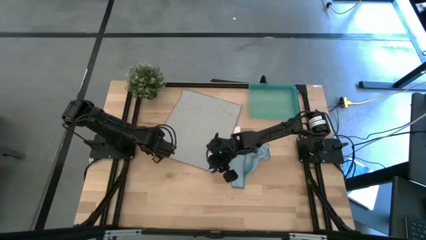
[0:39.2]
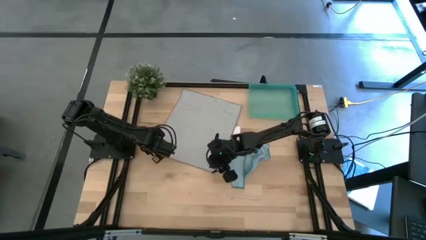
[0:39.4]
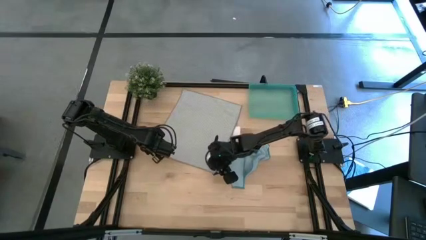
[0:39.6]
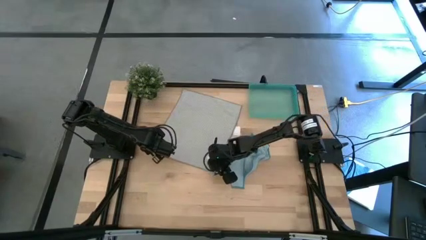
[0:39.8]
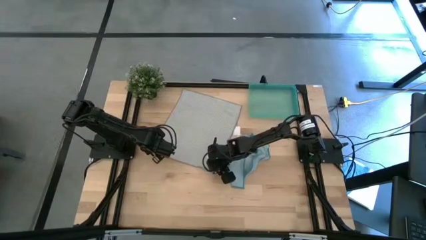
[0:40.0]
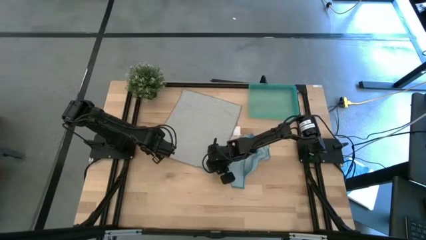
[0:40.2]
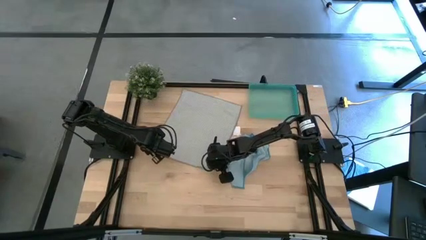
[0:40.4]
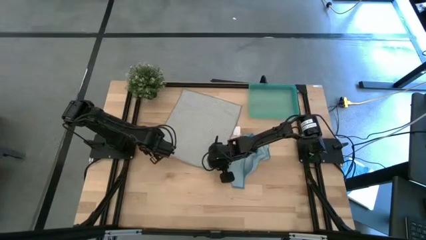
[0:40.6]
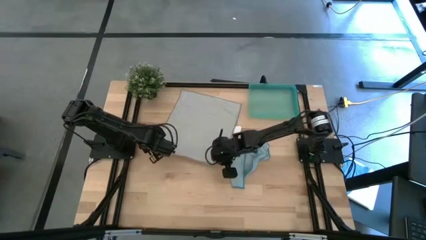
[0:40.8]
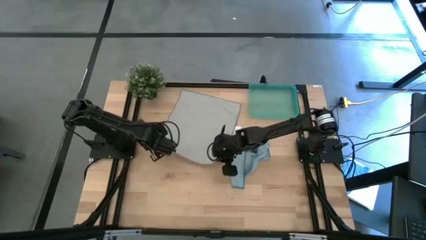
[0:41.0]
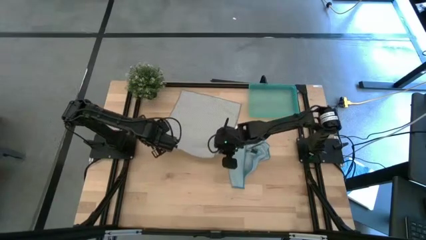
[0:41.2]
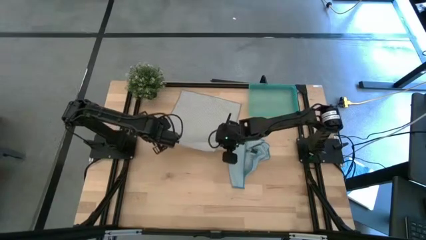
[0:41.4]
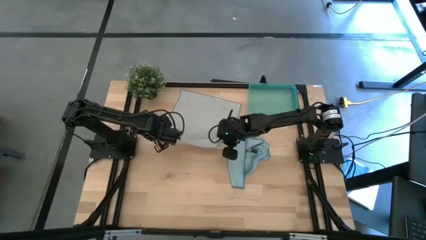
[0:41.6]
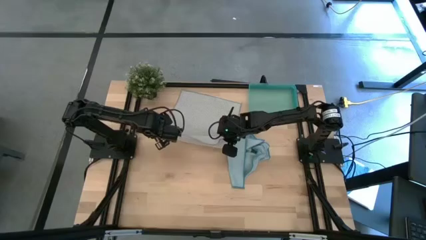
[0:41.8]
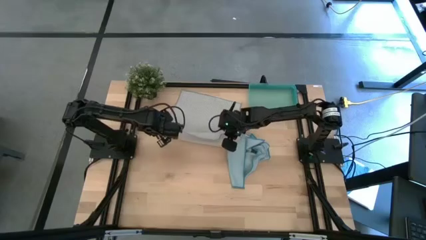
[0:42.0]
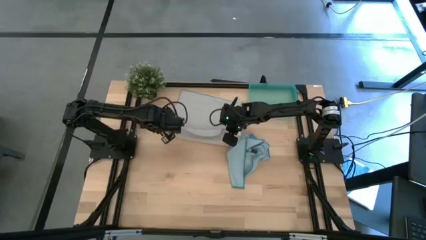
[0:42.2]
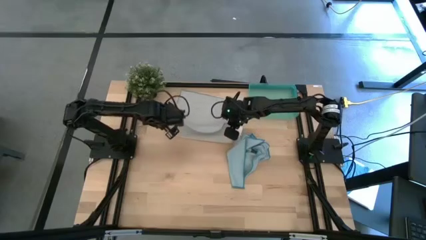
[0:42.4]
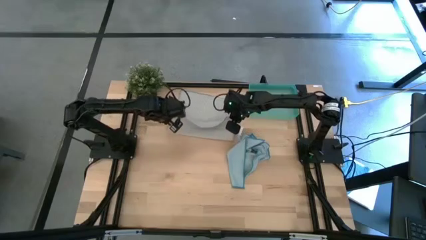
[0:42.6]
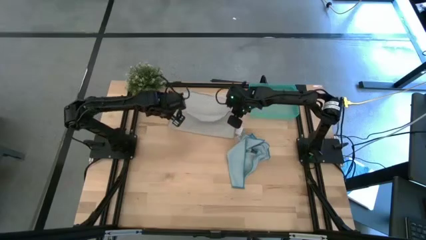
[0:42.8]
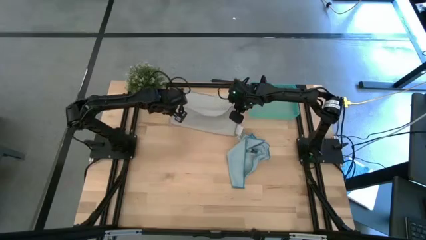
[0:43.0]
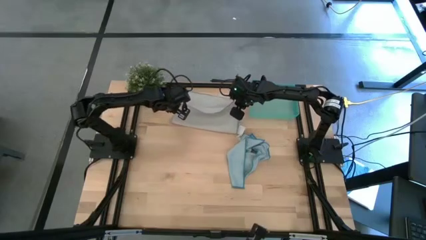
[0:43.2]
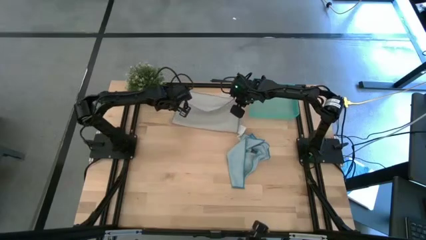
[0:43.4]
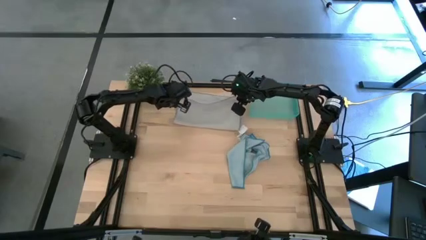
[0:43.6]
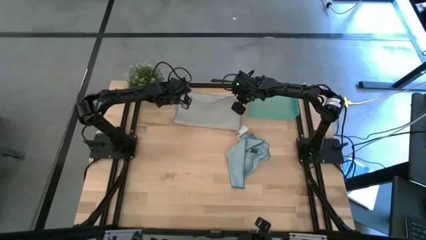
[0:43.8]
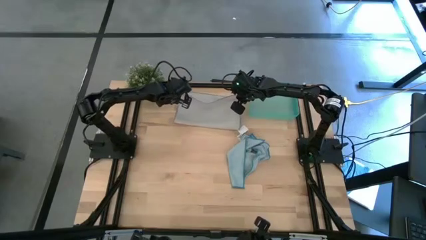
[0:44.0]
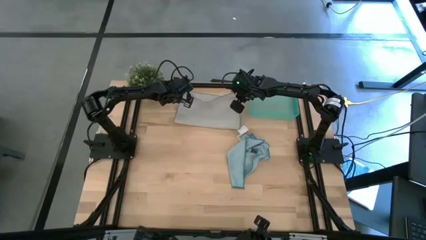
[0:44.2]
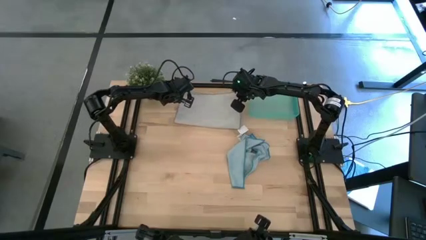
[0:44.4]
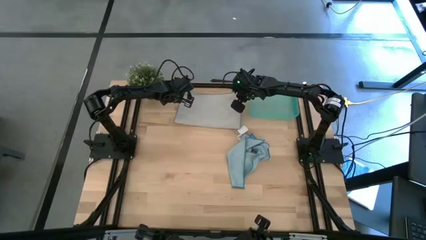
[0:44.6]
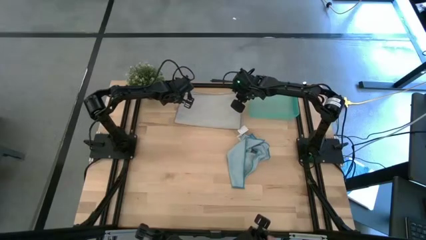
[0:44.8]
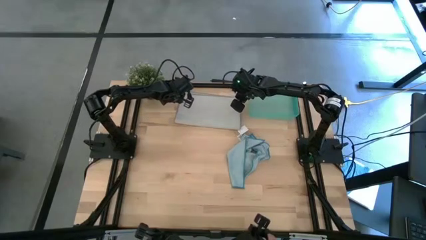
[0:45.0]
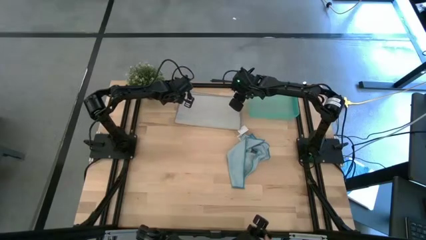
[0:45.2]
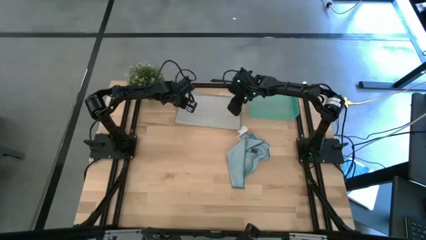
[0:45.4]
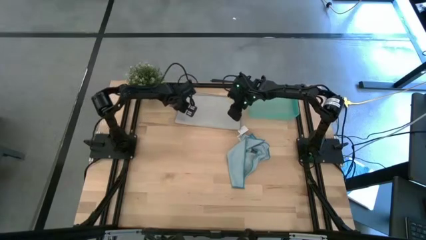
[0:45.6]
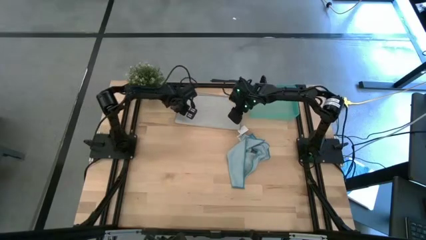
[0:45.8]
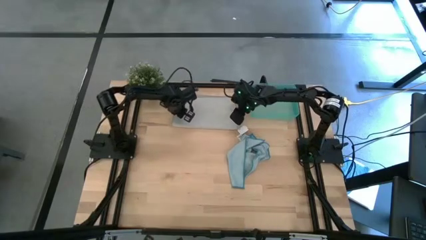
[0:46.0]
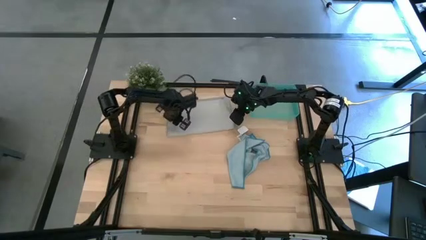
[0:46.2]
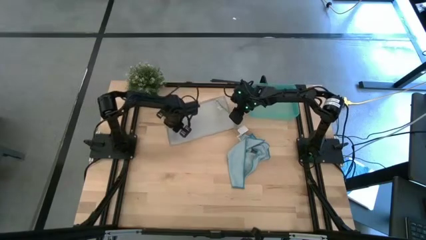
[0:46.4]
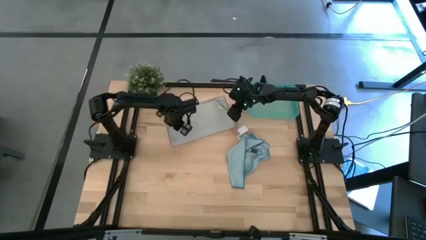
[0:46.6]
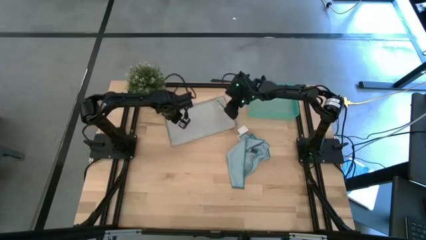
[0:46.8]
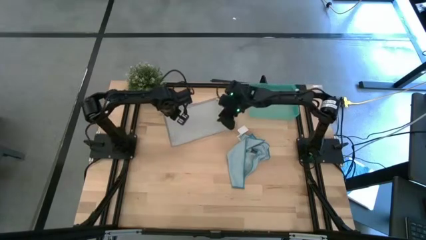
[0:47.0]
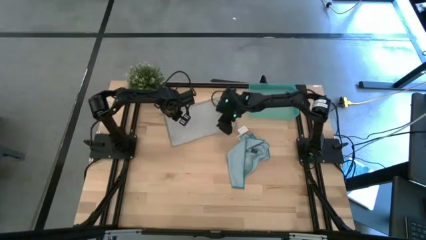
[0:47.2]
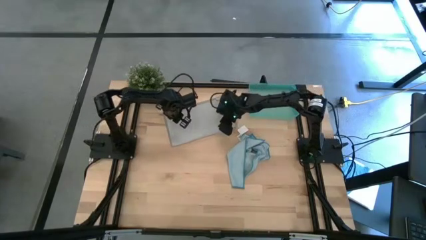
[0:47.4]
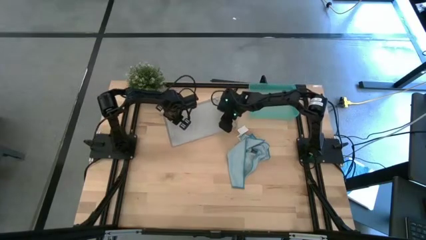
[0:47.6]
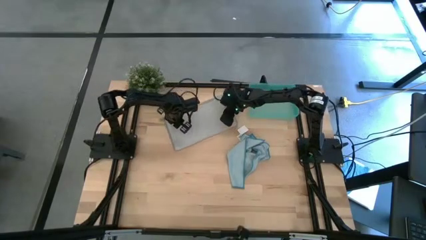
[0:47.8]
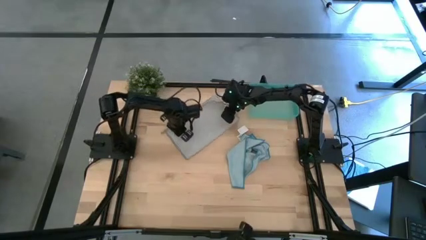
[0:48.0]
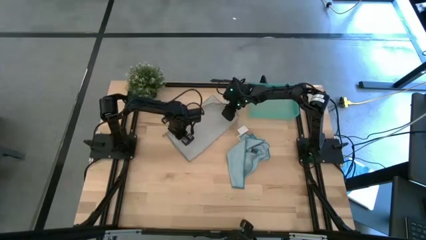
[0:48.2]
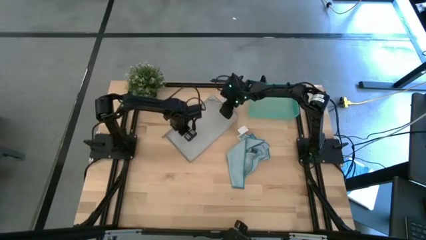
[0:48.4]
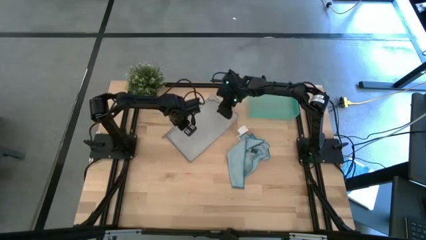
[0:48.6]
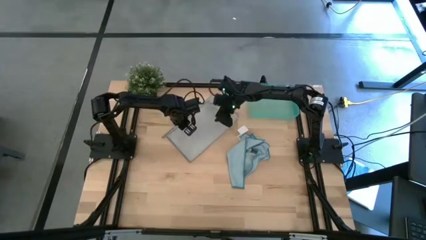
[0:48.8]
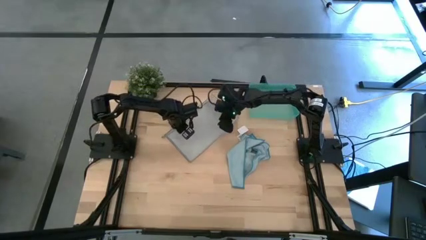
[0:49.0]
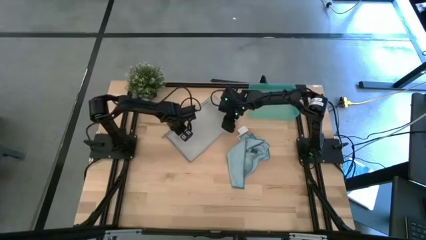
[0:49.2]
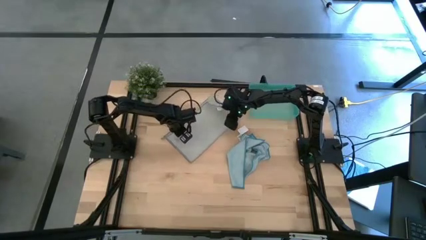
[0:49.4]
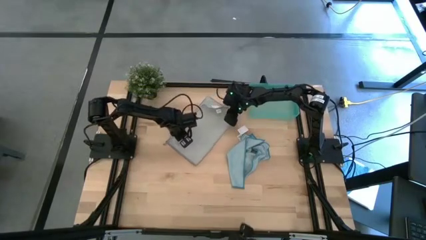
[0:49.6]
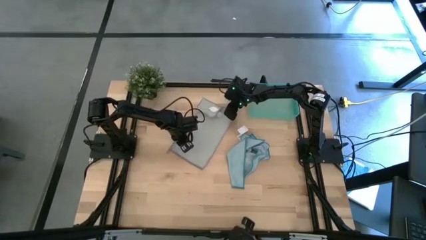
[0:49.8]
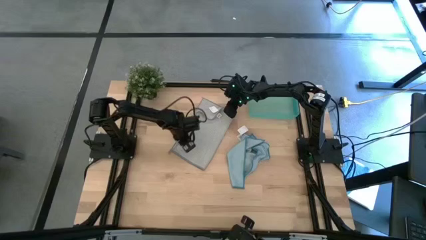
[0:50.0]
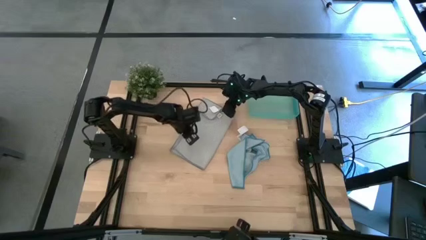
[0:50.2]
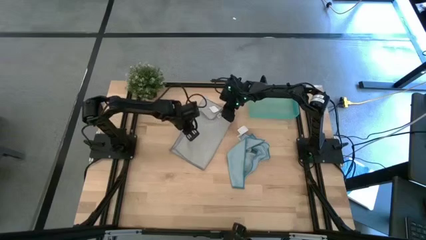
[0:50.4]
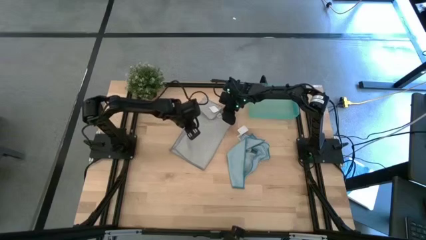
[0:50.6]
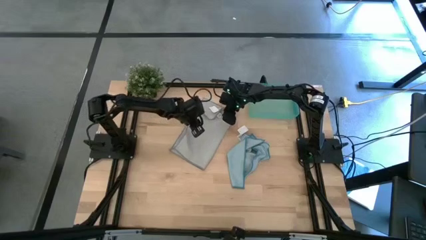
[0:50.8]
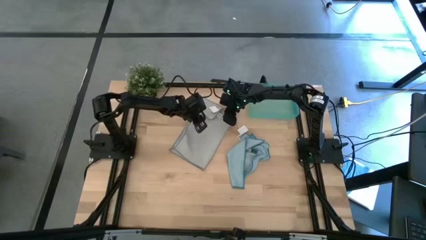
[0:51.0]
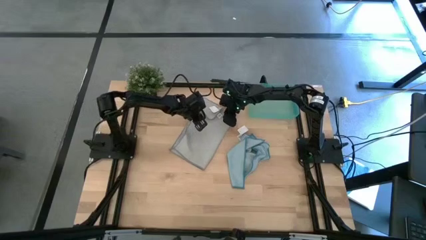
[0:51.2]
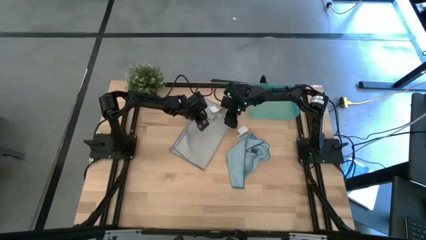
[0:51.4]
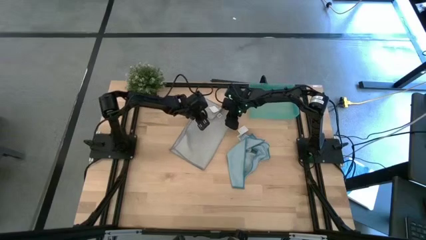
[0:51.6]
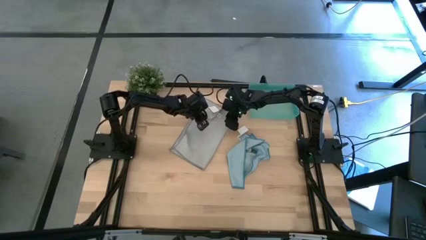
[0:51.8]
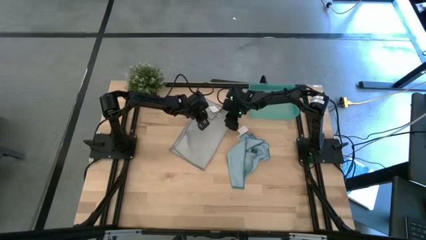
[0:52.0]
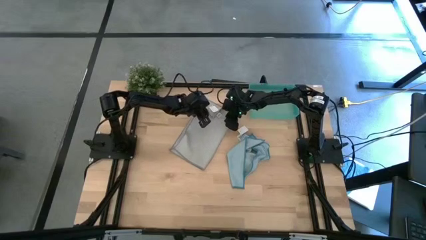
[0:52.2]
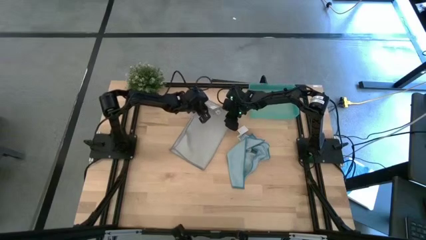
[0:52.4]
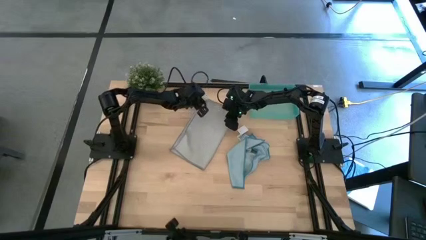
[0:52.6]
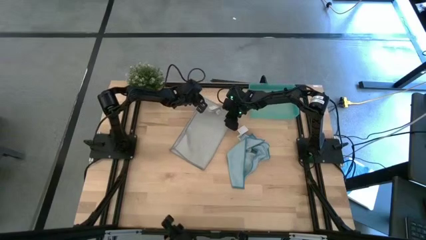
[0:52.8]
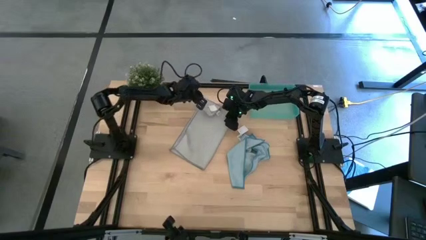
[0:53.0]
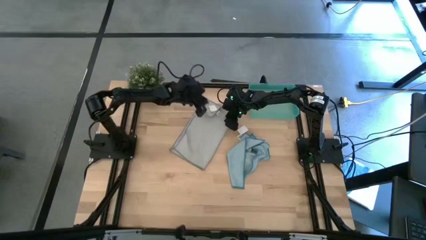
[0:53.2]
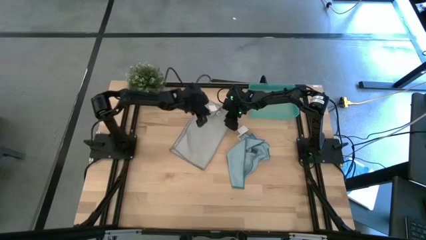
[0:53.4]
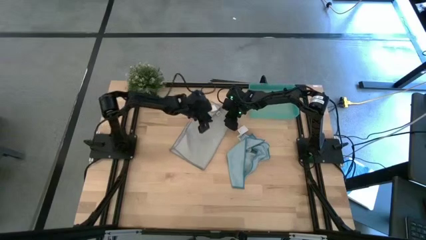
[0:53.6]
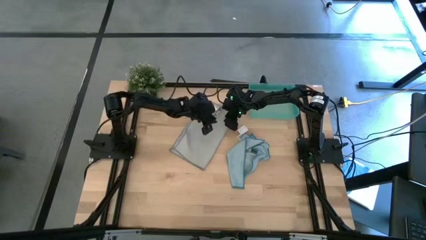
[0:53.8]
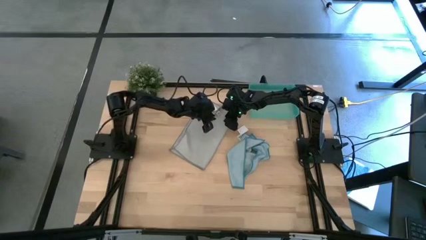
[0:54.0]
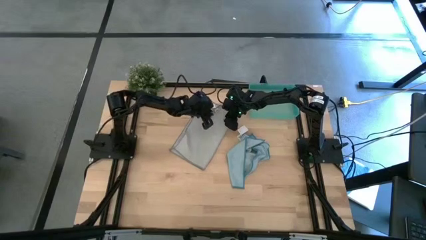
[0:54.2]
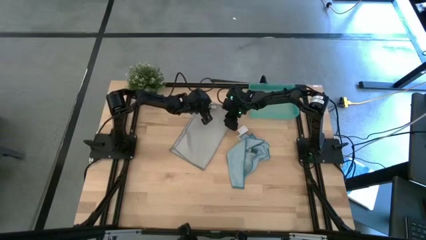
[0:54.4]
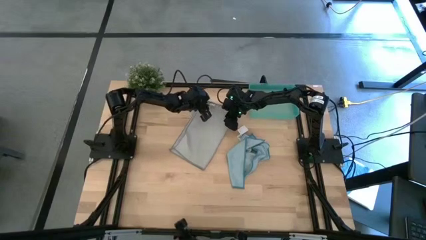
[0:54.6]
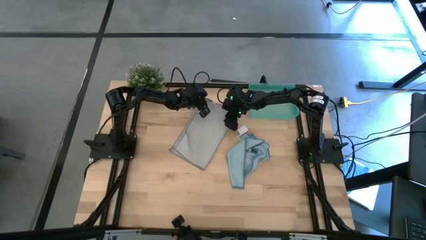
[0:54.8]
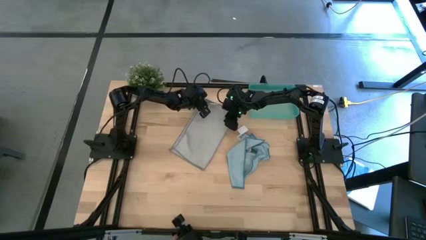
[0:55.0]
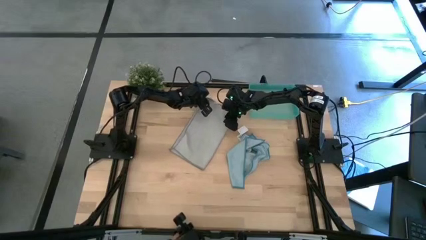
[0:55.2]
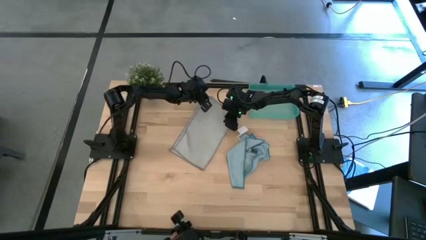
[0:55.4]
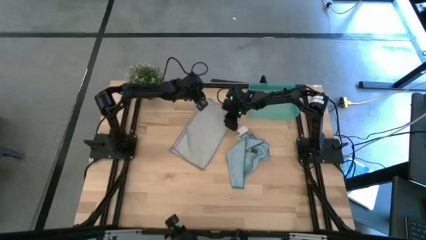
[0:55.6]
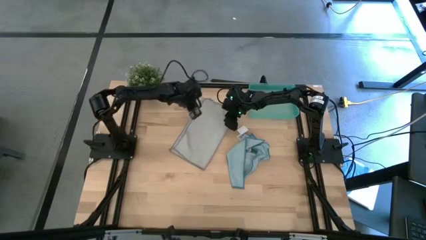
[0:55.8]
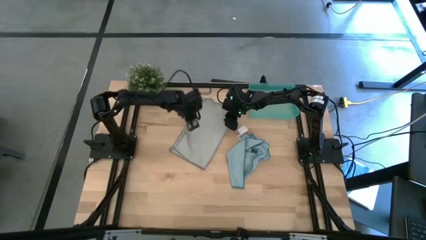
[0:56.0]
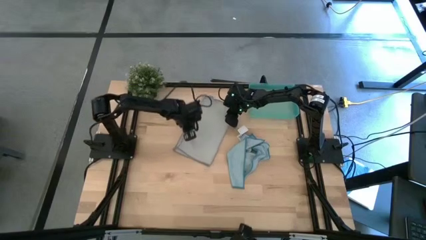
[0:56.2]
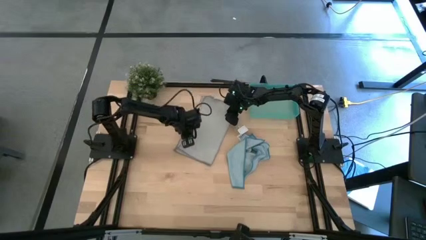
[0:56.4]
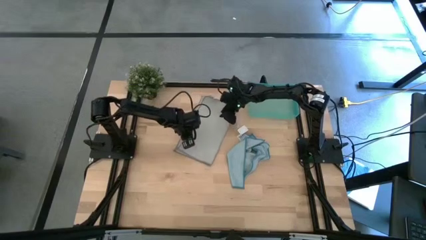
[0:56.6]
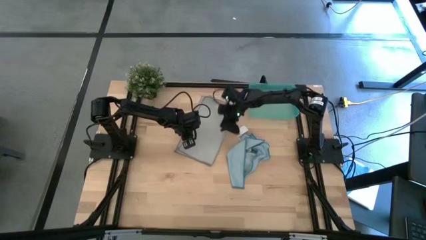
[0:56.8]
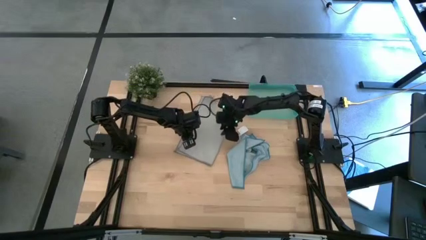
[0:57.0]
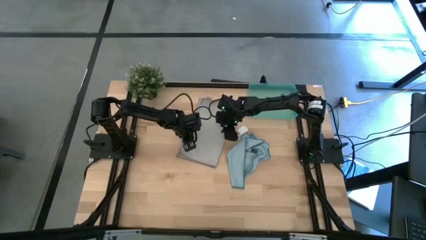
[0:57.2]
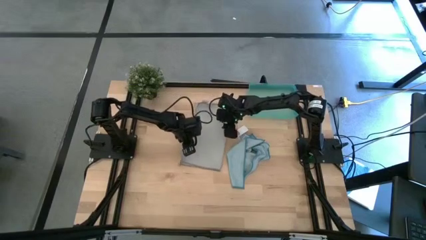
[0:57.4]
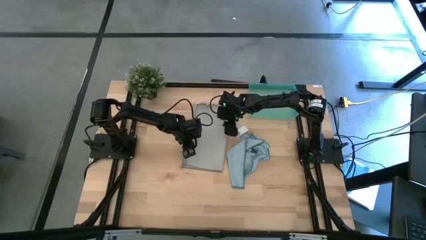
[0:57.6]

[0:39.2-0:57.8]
Task: Roll microfiber towels into tight, uniform cylinder then place into a basket
Roll the grey microfiber towel
